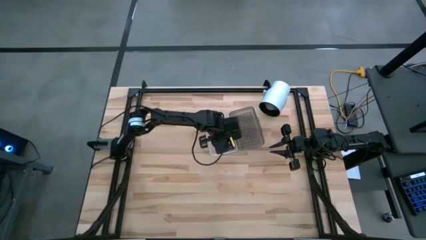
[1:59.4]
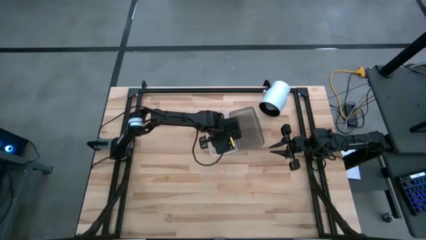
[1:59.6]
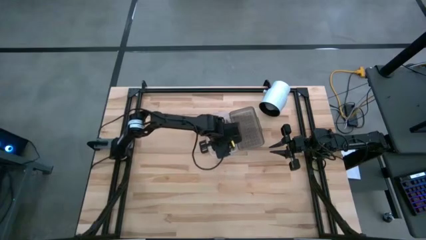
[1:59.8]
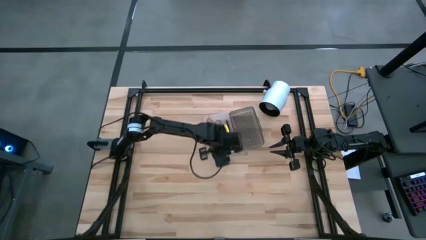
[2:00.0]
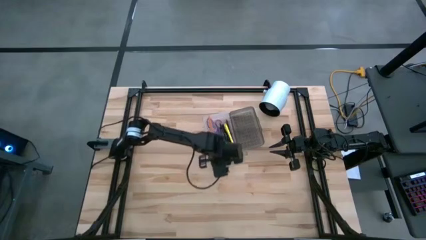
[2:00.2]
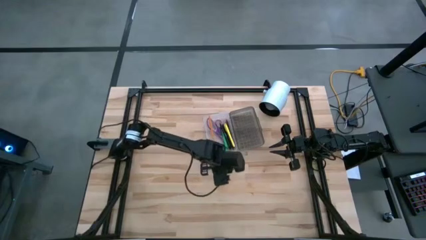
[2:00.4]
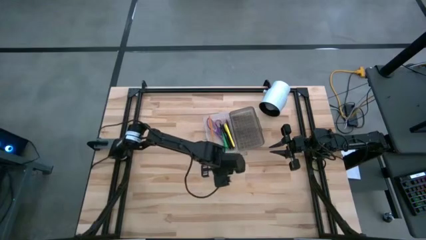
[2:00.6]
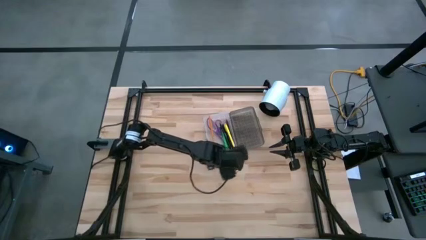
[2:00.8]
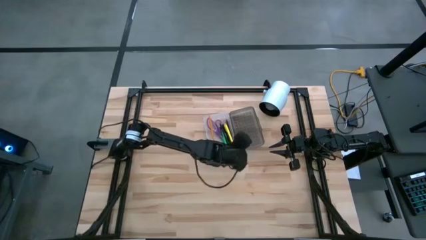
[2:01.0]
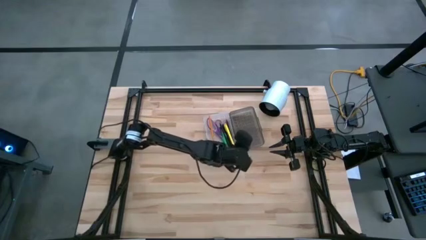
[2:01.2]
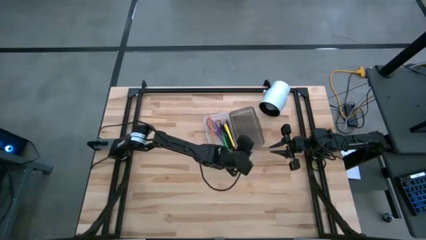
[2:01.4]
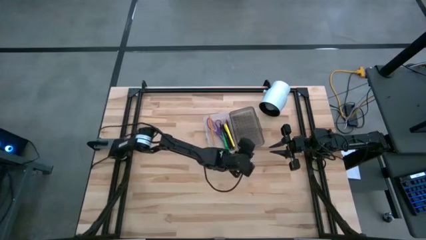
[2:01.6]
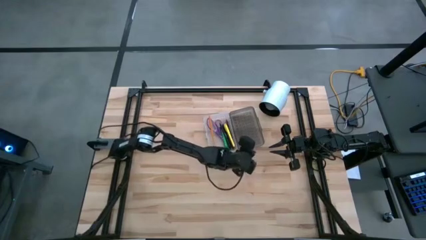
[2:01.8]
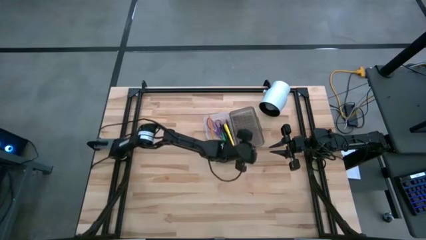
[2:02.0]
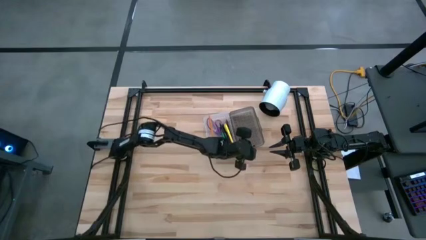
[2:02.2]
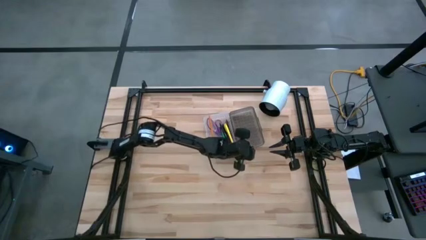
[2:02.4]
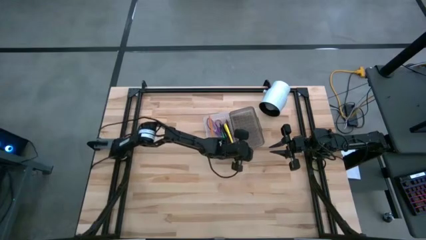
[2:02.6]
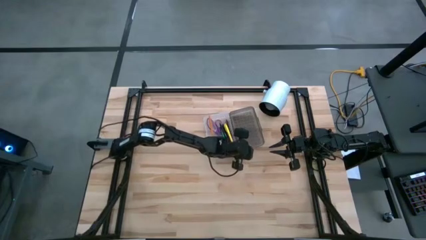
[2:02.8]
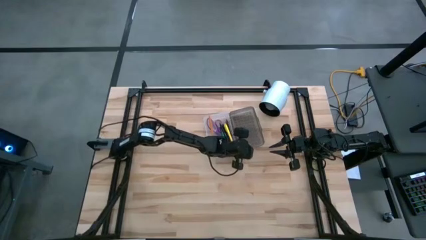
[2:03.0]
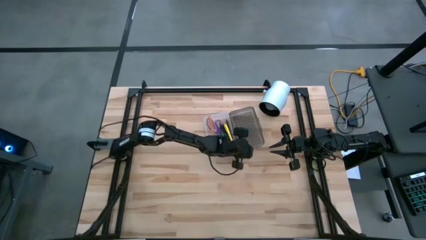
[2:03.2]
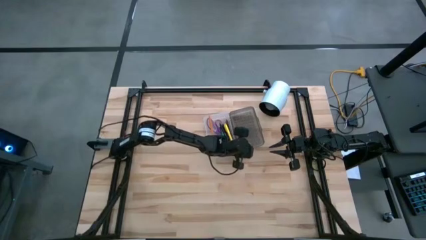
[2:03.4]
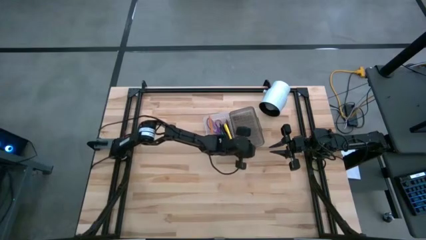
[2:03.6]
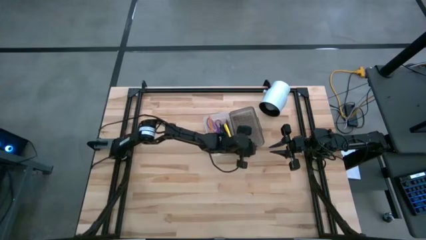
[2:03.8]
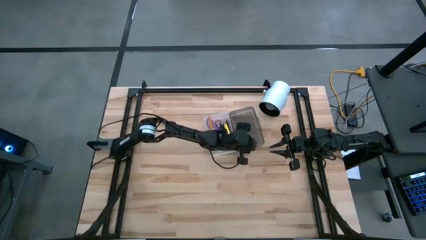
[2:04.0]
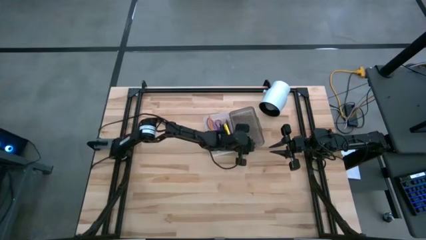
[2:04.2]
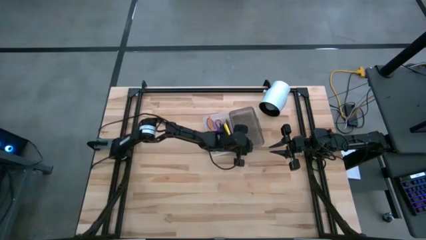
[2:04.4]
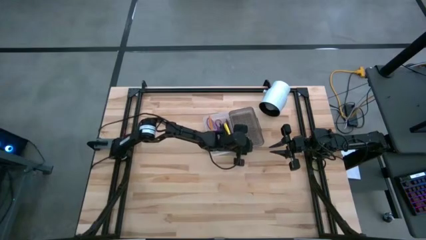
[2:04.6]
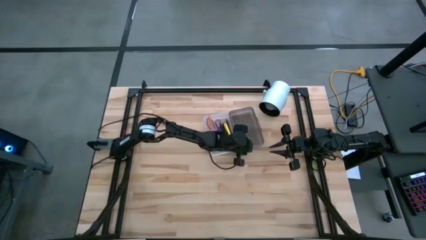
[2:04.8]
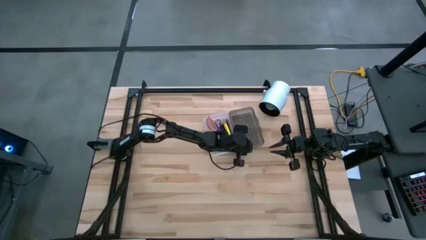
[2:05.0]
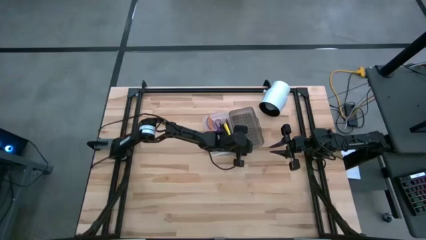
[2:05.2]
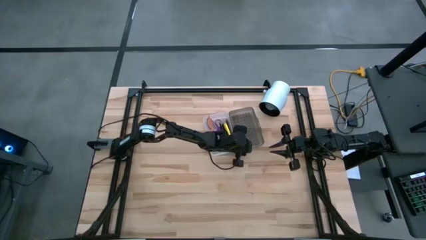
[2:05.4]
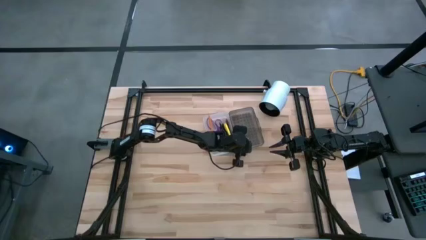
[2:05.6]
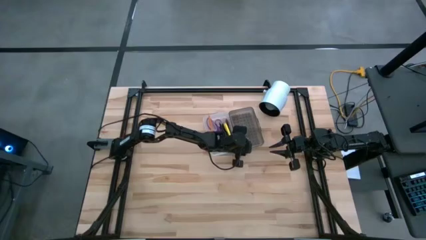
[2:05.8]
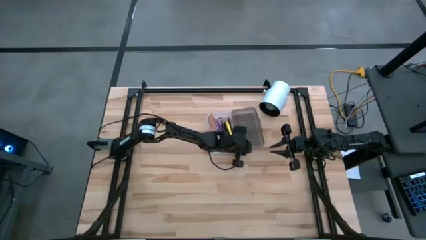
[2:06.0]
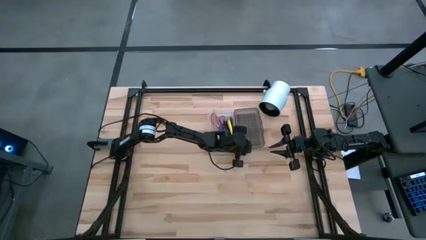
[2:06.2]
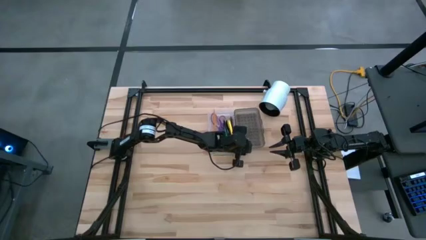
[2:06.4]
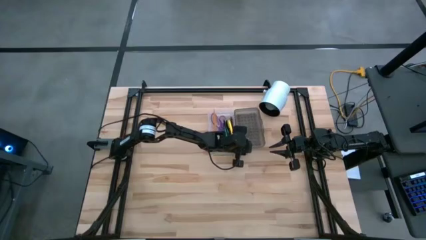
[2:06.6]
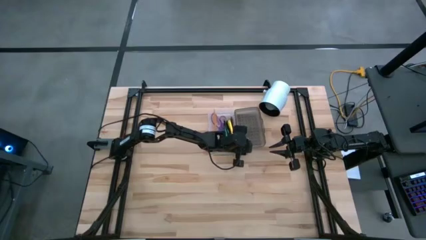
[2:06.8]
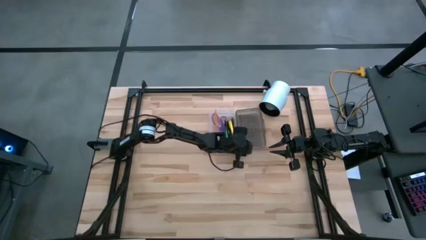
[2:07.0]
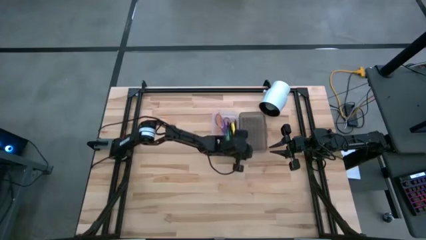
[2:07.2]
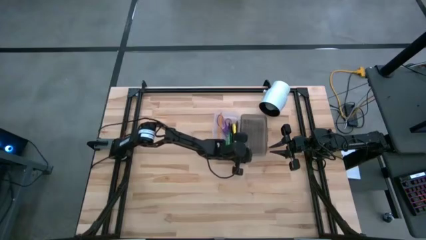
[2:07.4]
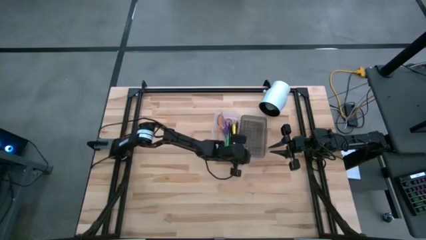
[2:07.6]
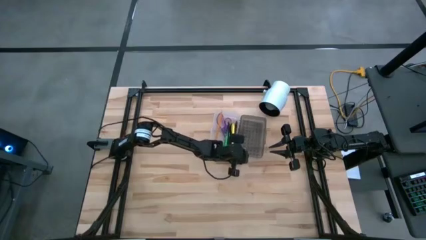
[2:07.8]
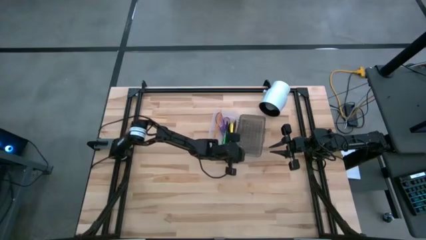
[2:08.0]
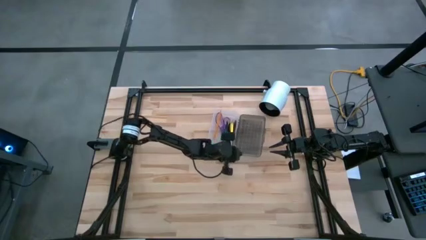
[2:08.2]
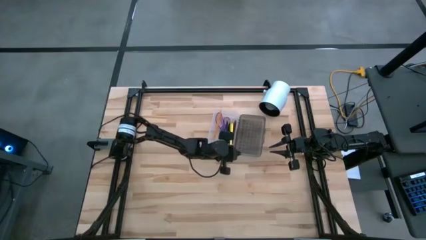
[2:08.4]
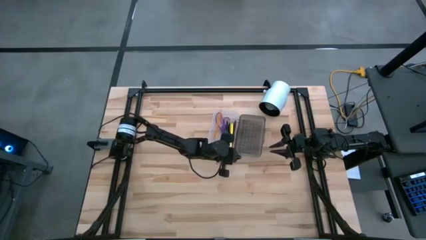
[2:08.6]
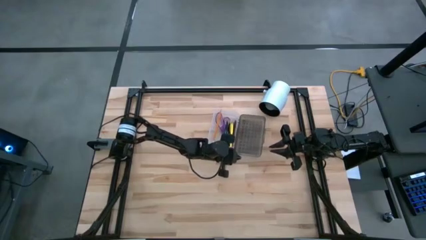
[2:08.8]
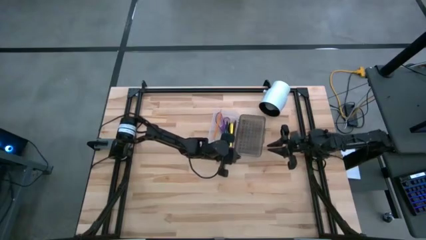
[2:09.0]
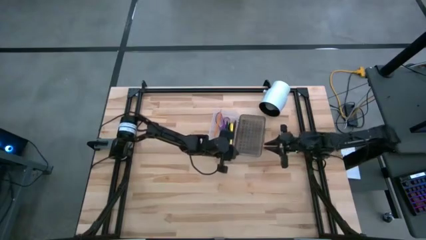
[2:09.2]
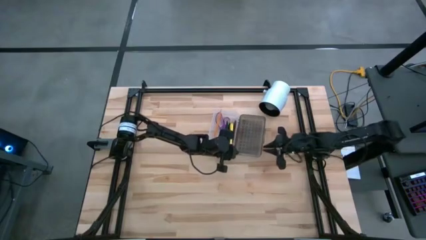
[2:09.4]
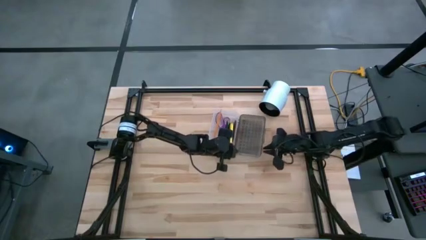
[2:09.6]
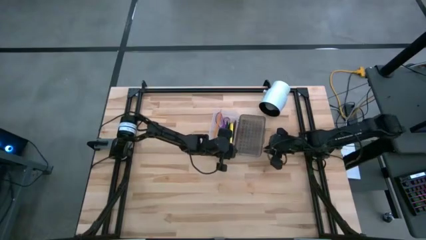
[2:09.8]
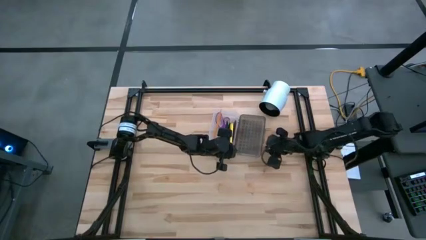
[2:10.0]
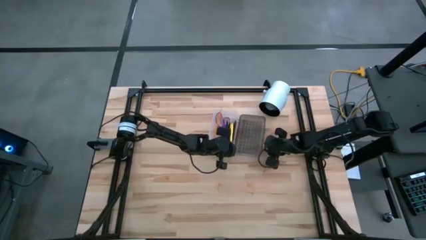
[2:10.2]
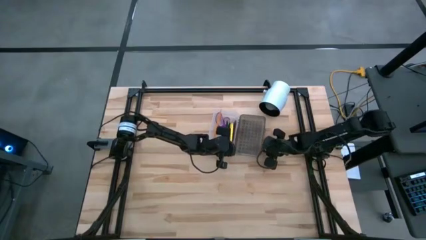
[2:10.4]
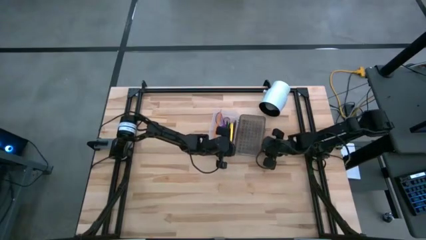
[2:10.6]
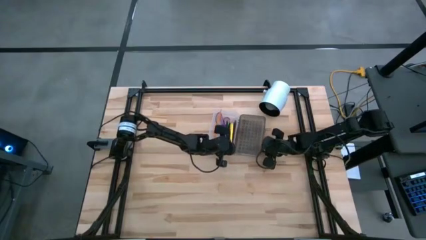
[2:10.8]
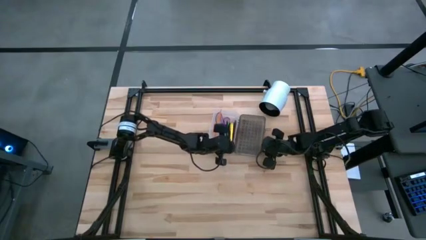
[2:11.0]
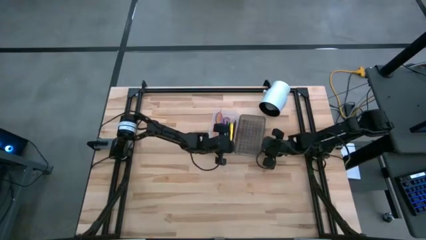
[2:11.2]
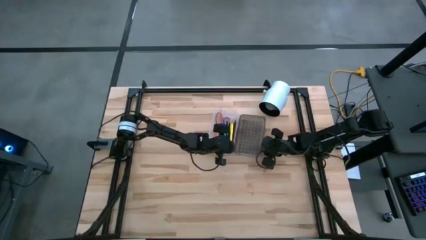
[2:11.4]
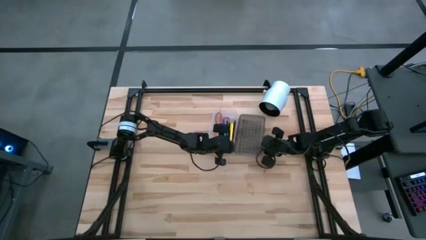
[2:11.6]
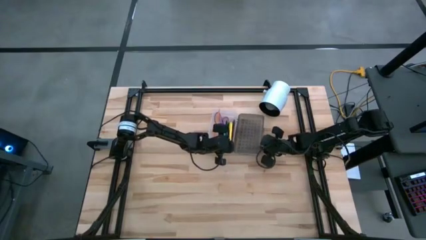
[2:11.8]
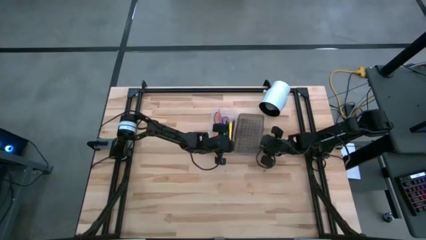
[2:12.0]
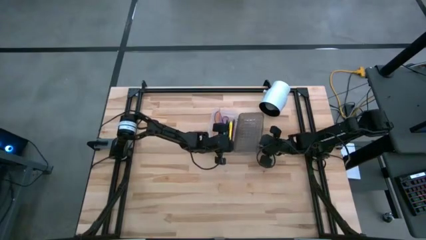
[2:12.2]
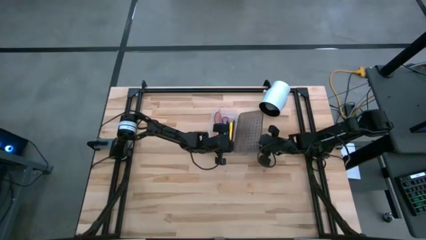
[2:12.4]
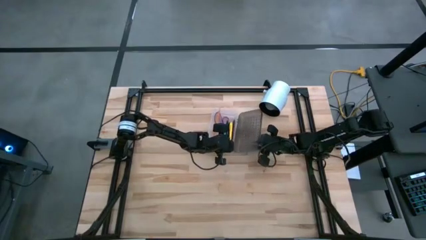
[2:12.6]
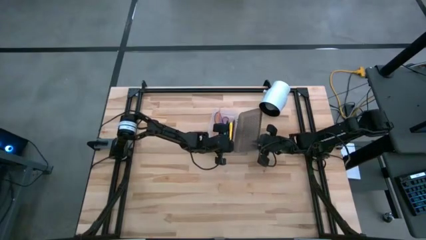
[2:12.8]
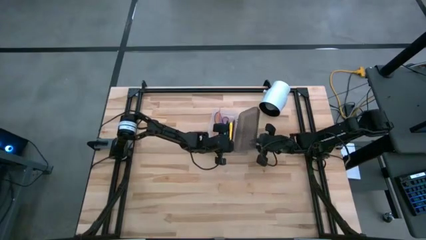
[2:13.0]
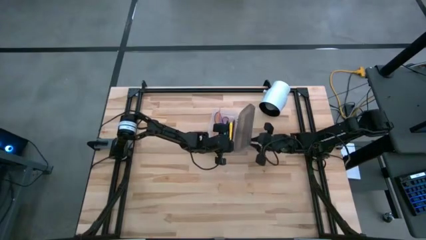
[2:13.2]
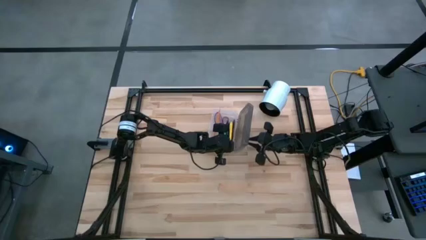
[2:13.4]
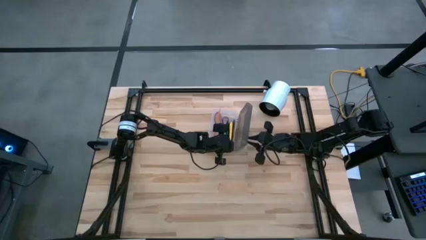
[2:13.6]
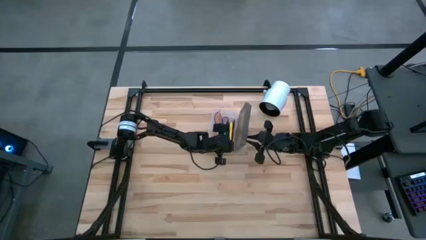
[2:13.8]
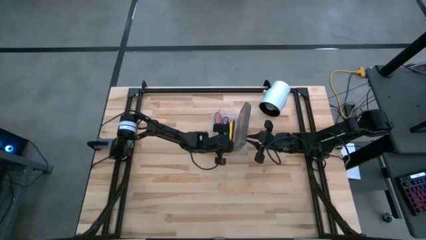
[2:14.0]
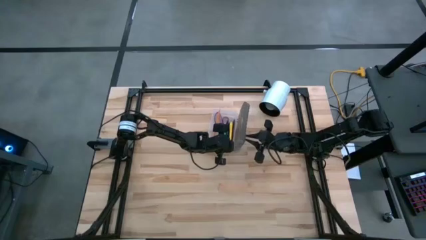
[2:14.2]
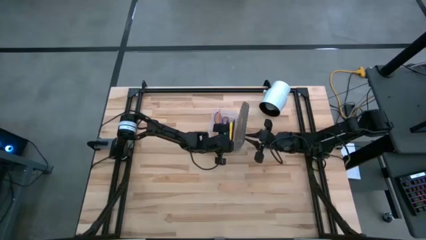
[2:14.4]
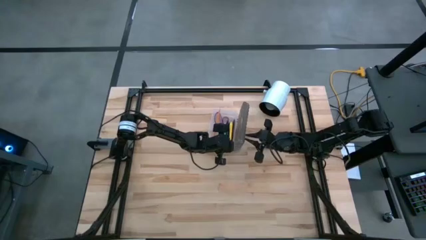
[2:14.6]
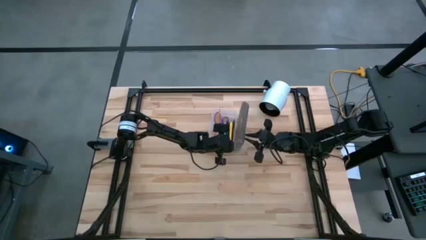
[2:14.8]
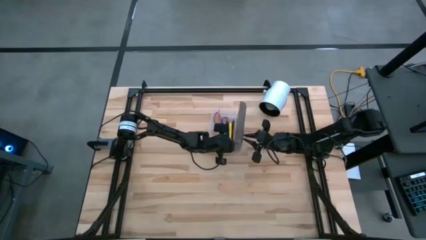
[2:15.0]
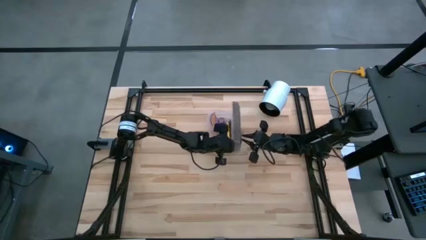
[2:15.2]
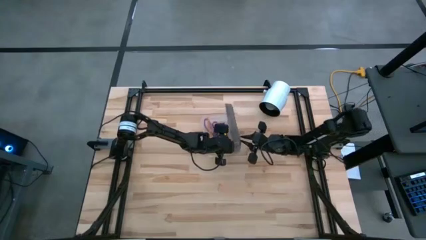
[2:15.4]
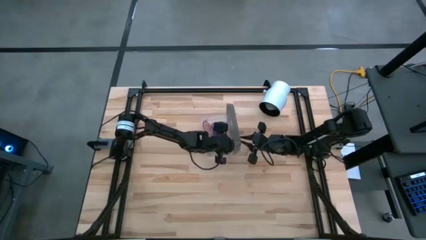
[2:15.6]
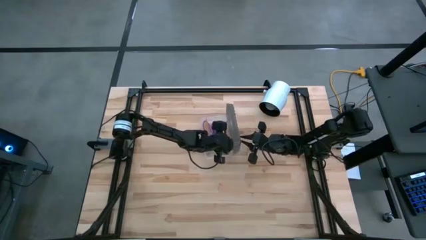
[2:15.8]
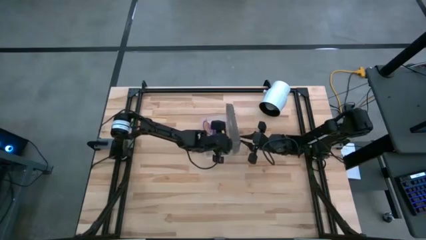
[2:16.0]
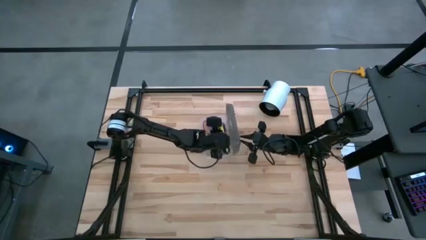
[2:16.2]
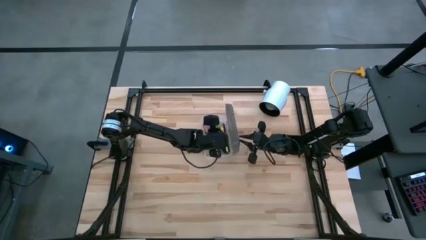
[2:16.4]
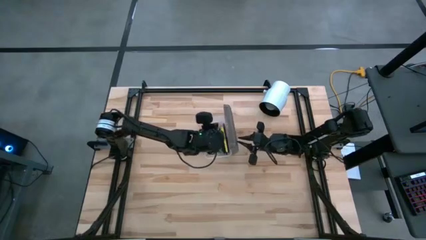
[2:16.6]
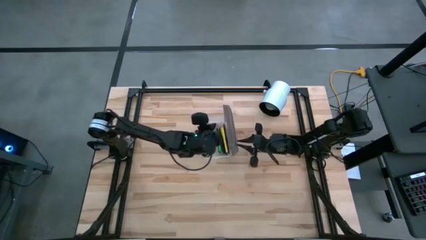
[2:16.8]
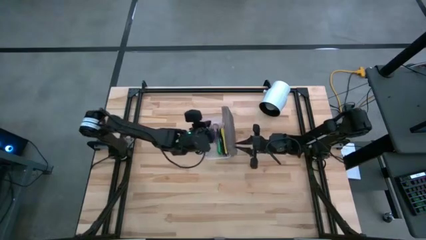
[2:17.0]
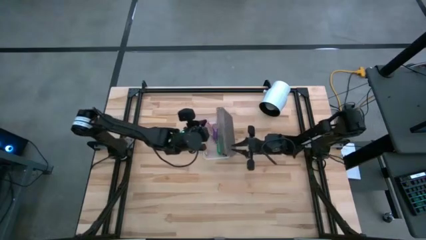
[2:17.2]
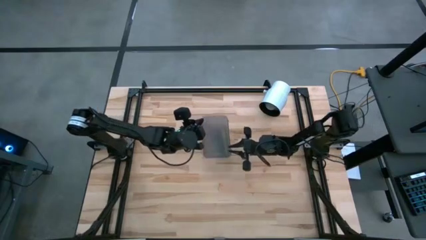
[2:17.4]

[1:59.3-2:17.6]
Task: Pick & place school supplies into a supply box
Close the supply box
